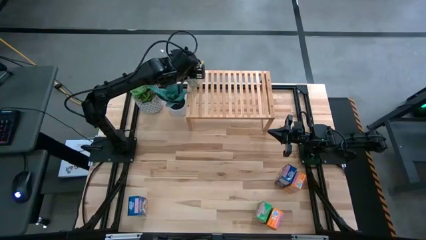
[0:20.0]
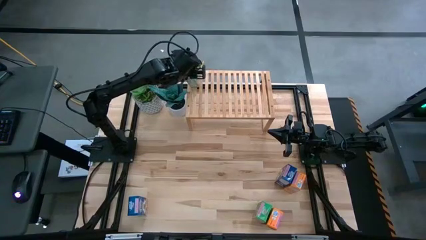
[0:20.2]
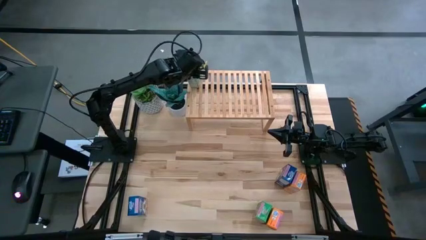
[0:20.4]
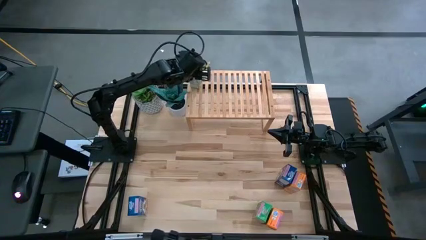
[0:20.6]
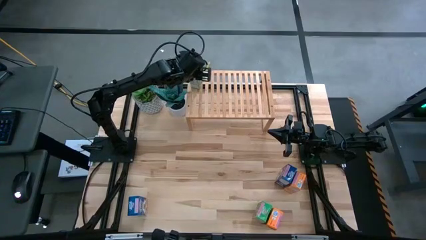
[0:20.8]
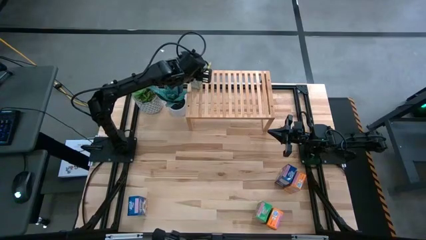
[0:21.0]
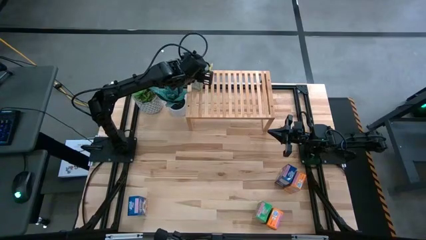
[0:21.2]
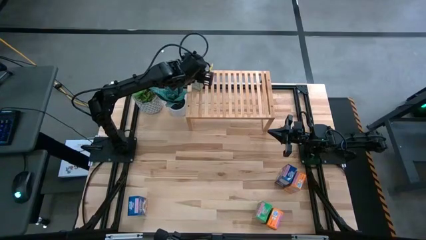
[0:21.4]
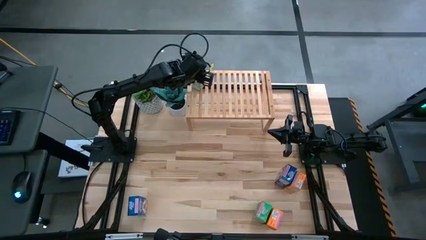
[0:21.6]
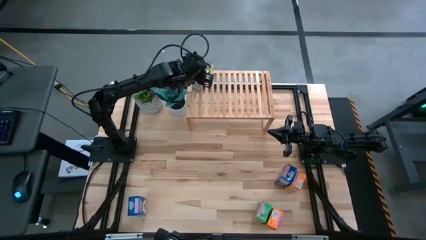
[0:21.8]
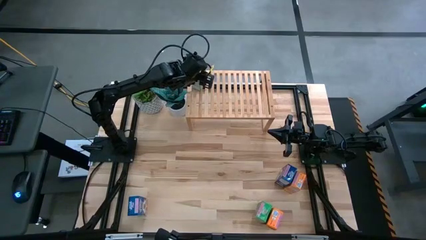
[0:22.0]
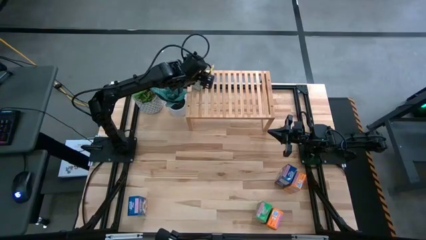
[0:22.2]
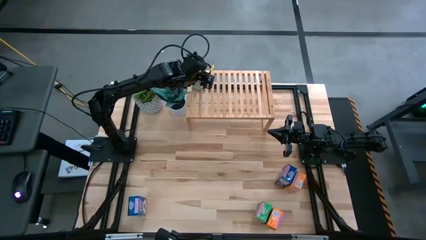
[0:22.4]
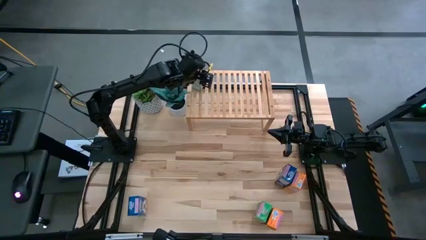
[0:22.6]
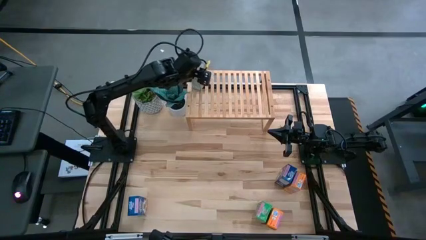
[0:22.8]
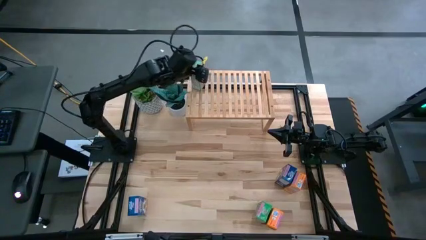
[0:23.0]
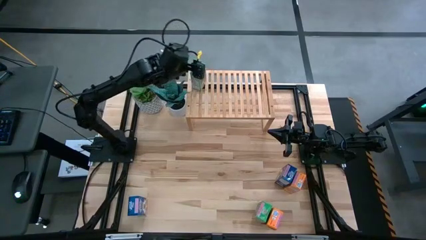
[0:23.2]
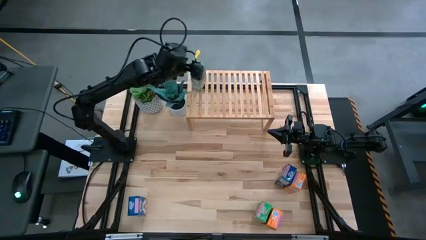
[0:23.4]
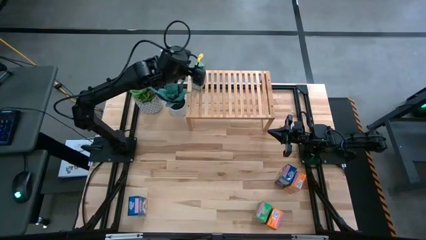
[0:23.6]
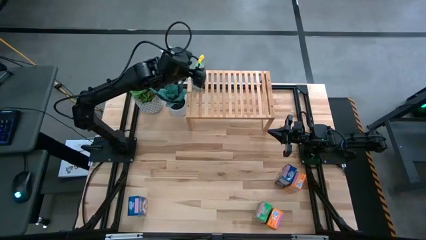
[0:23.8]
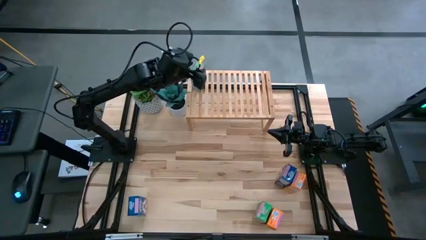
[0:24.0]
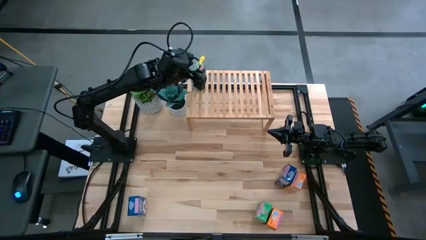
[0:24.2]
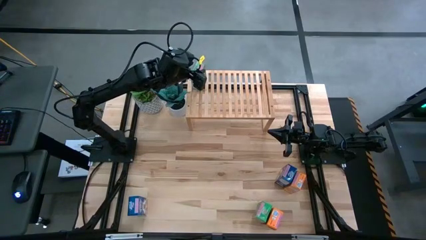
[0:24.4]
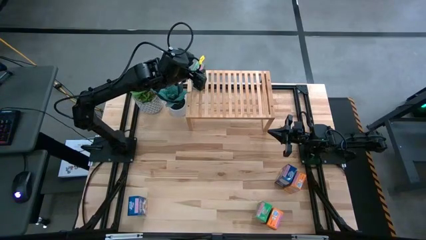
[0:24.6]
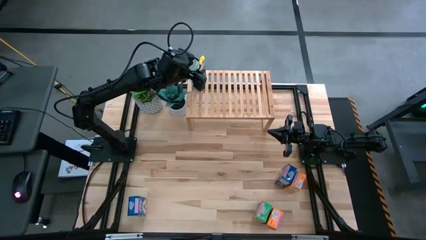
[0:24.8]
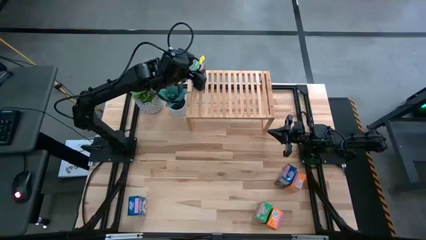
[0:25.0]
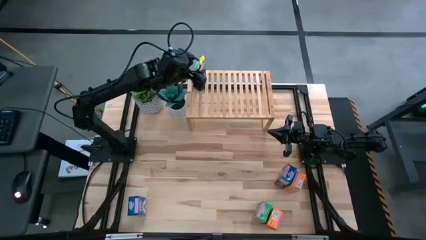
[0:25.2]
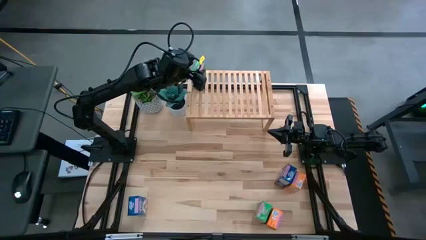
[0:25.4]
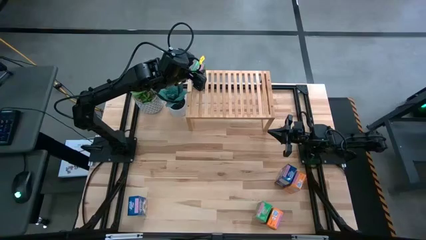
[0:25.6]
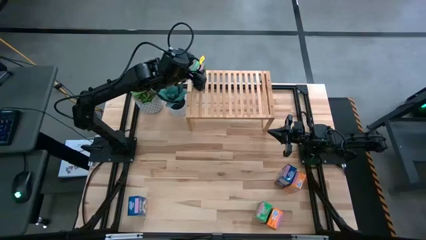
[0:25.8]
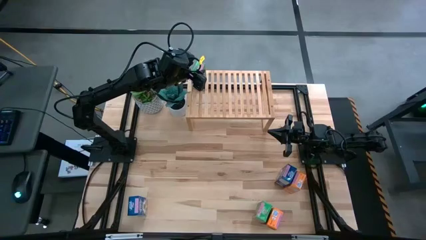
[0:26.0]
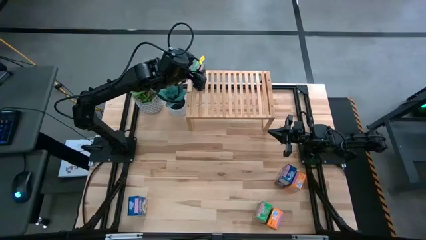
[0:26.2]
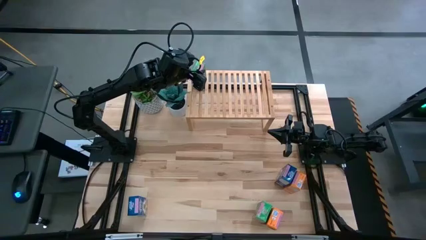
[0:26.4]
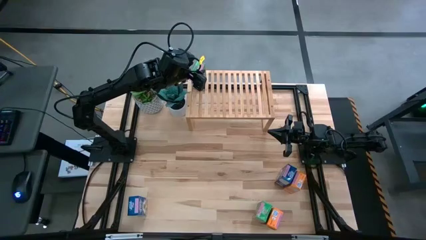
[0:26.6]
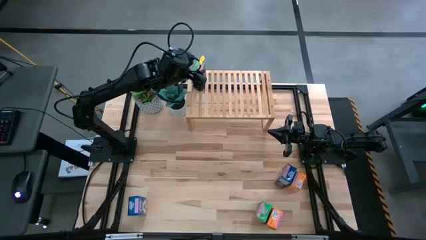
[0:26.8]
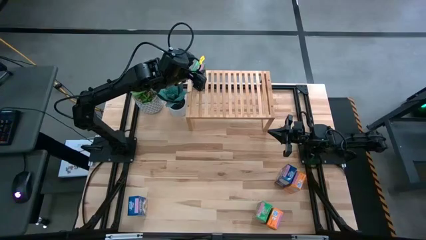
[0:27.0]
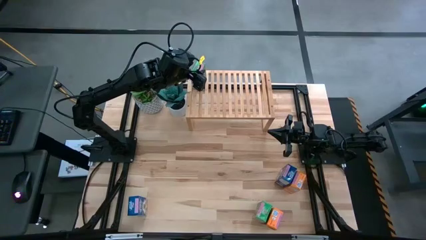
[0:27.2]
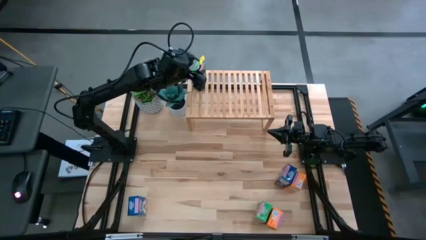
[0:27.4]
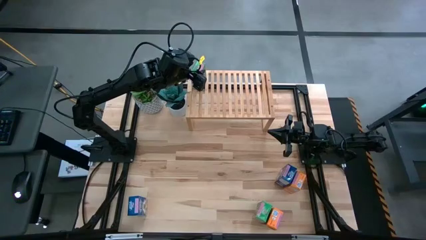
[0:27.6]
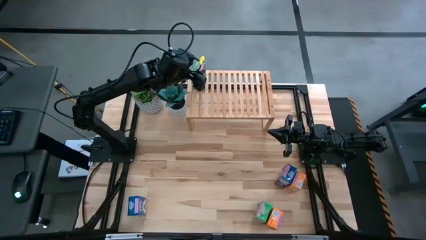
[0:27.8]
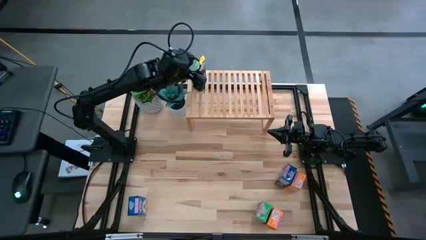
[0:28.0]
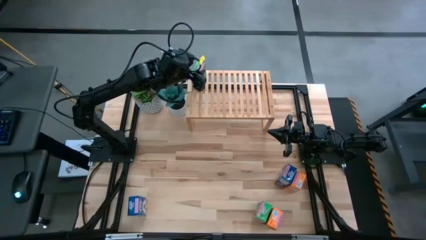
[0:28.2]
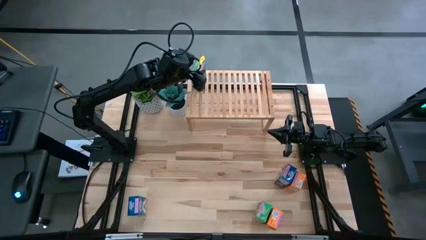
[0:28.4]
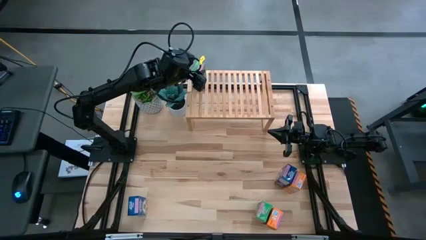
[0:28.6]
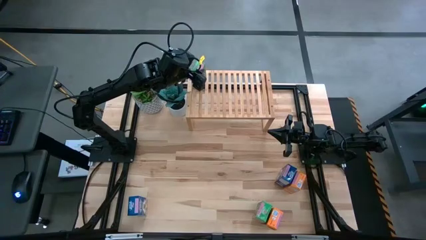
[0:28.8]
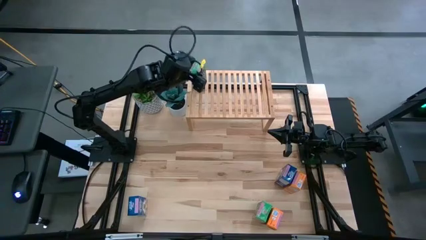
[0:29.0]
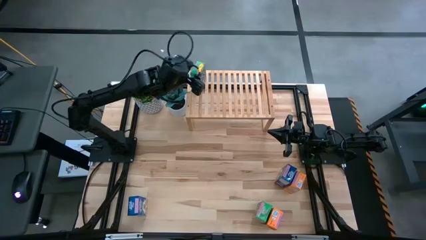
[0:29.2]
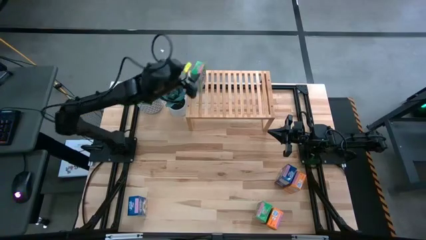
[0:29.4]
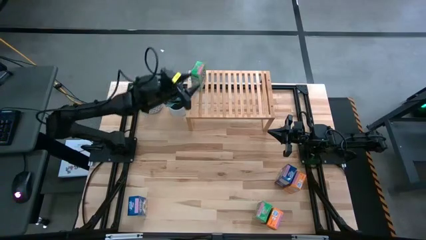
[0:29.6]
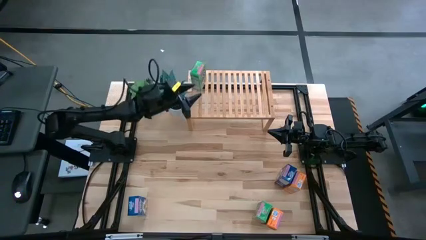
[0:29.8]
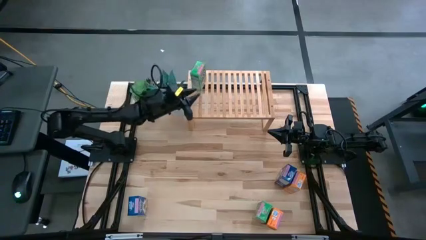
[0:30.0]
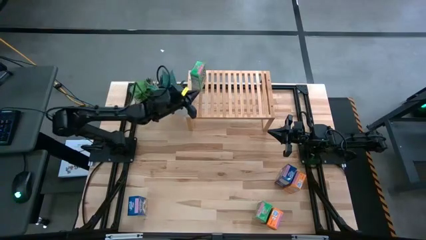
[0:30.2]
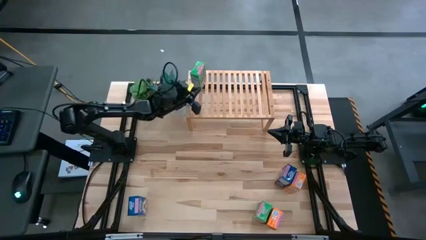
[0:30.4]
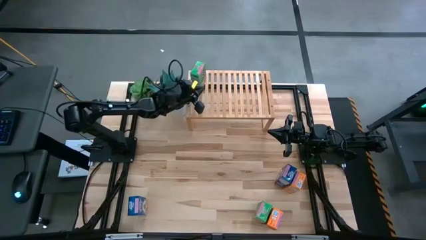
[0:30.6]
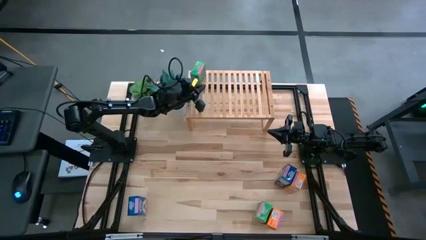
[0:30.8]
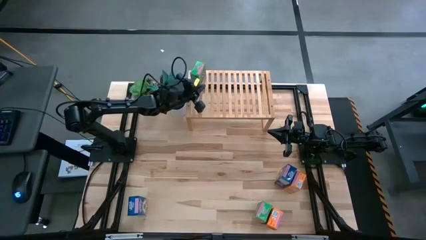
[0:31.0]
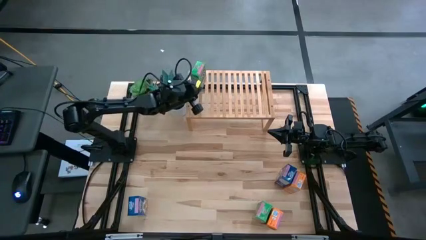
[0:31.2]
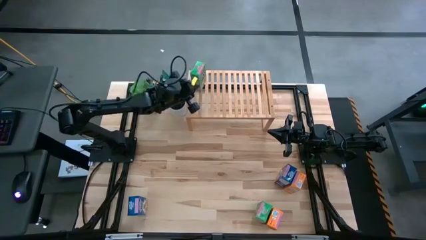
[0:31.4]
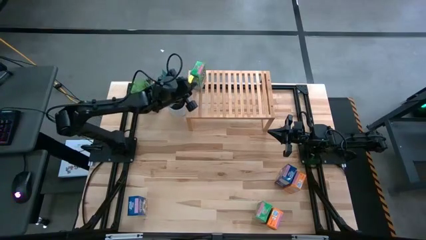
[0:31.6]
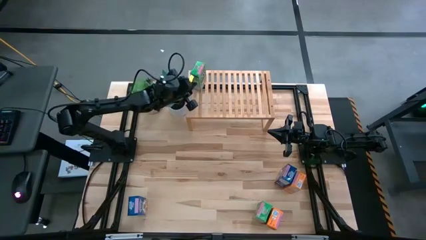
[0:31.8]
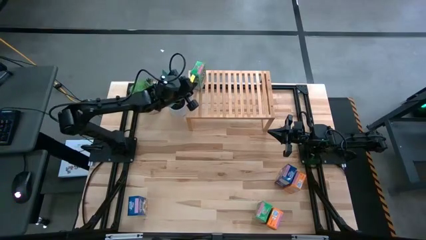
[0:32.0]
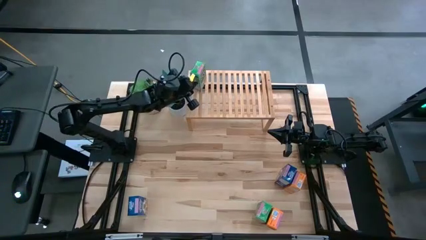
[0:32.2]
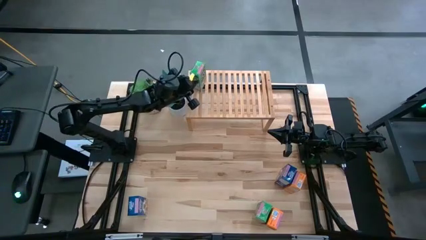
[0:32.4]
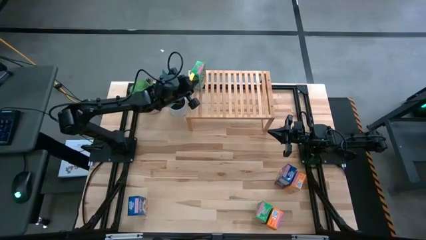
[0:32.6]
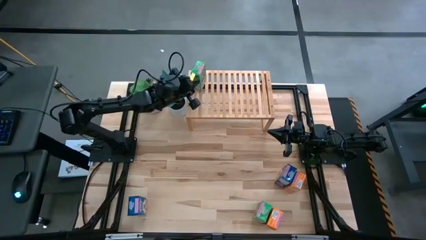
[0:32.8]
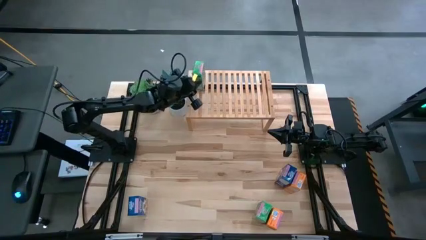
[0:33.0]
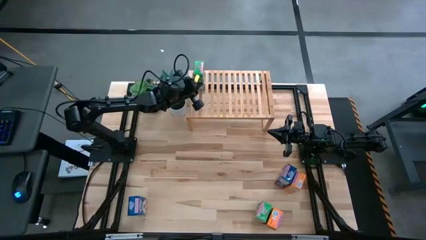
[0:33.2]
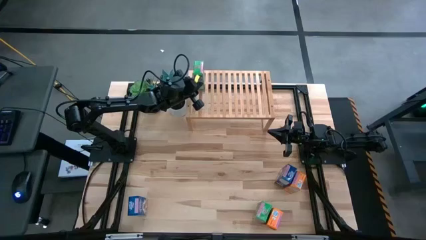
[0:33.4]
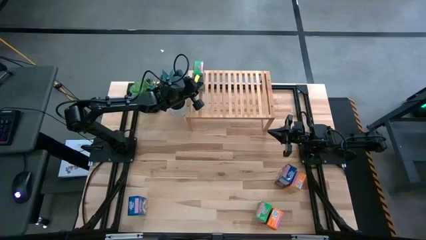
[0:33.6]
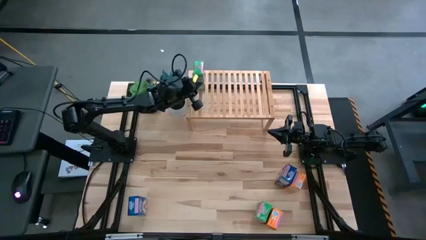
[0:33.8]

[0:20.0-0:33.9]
Task: Stack cereal on shelf
Put the left green cereal box on the shelf
